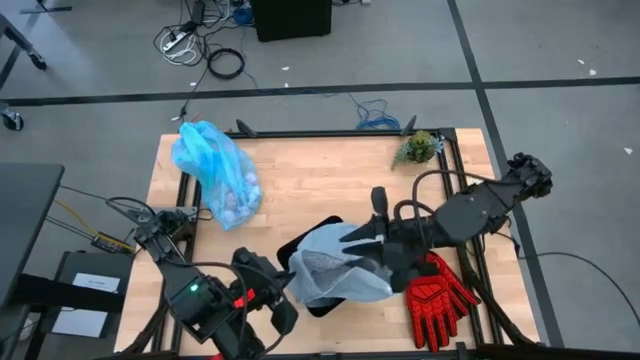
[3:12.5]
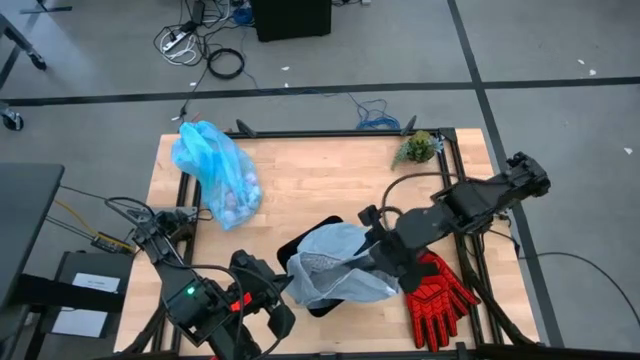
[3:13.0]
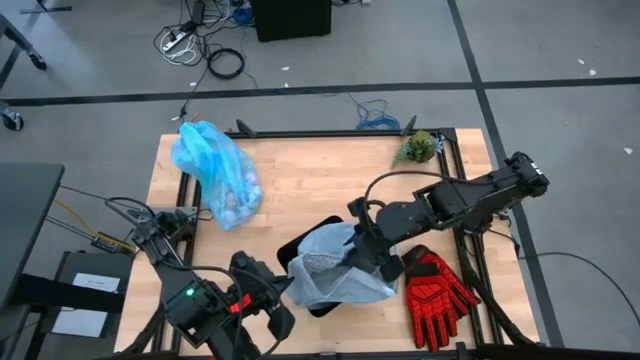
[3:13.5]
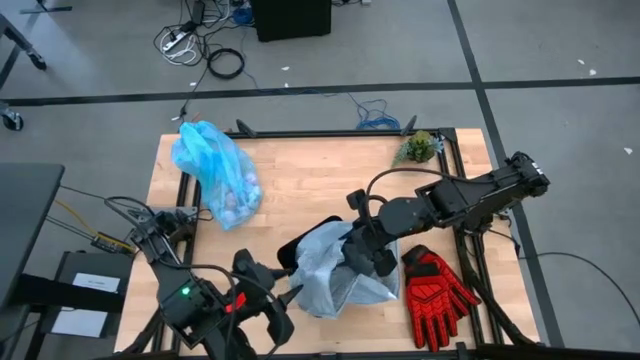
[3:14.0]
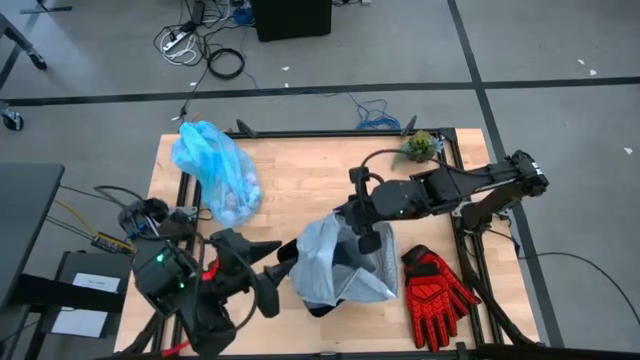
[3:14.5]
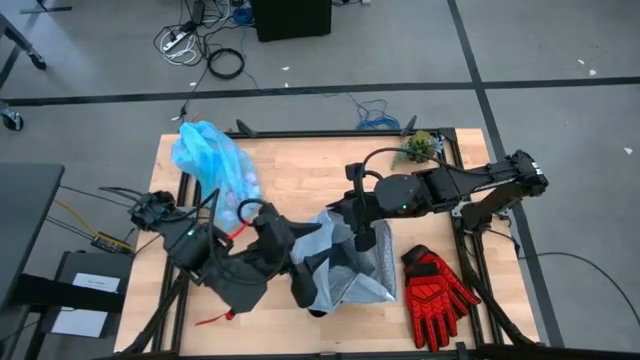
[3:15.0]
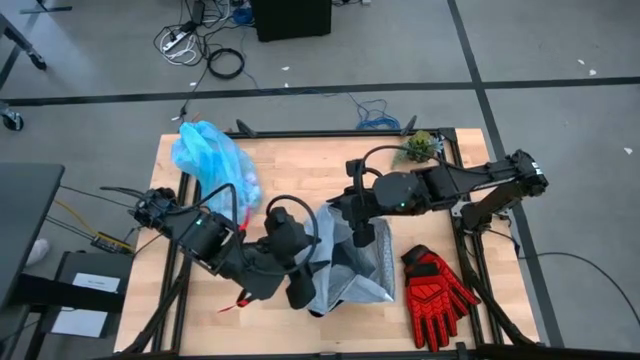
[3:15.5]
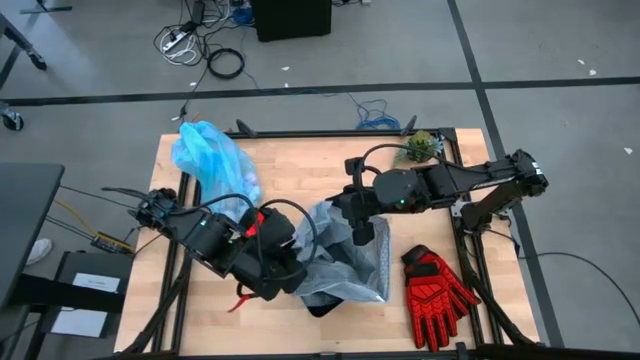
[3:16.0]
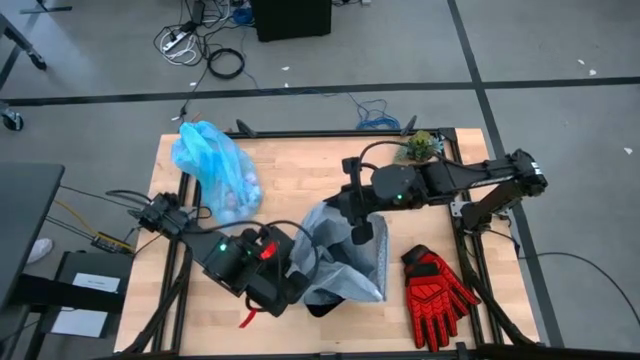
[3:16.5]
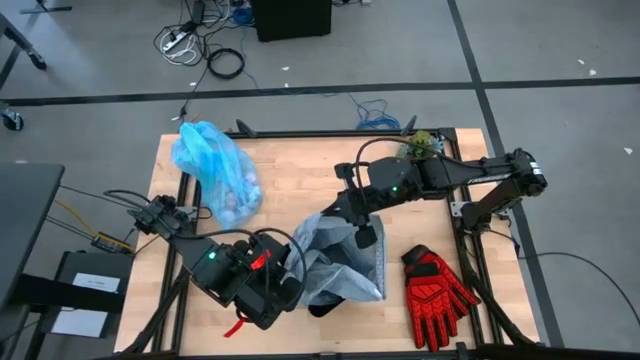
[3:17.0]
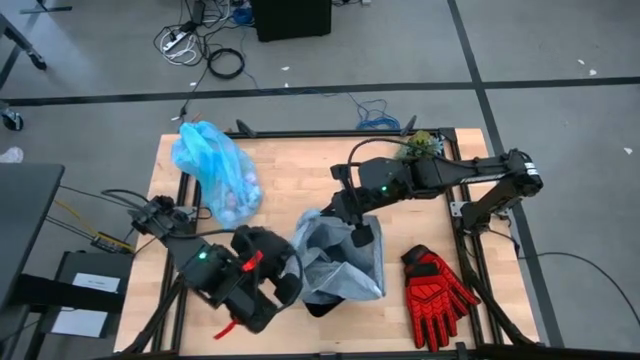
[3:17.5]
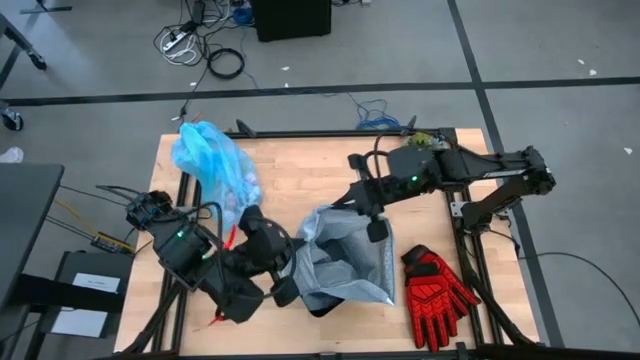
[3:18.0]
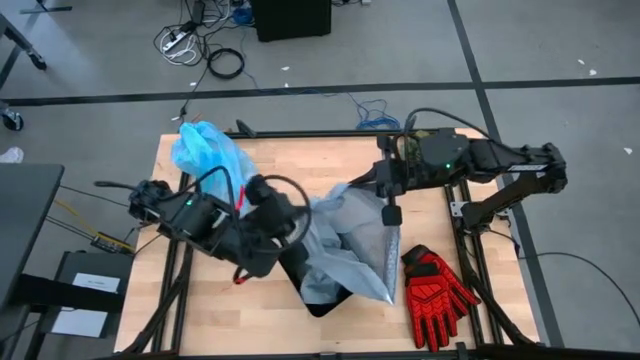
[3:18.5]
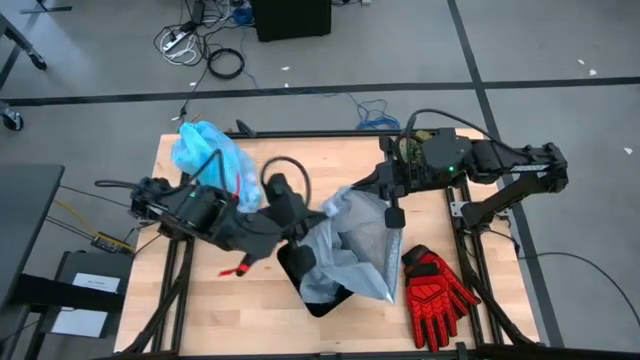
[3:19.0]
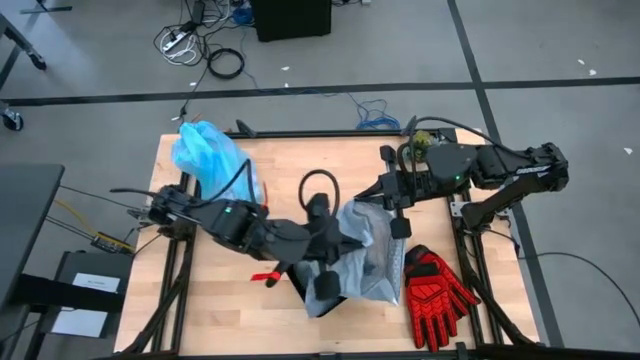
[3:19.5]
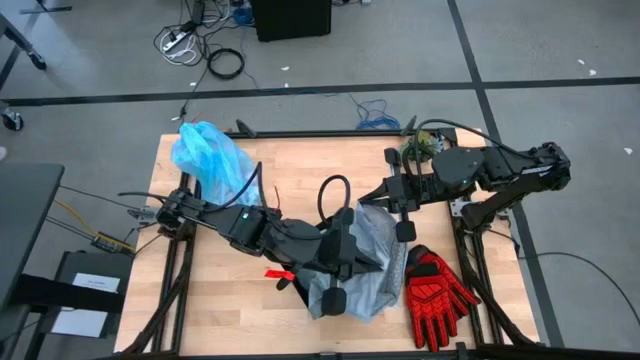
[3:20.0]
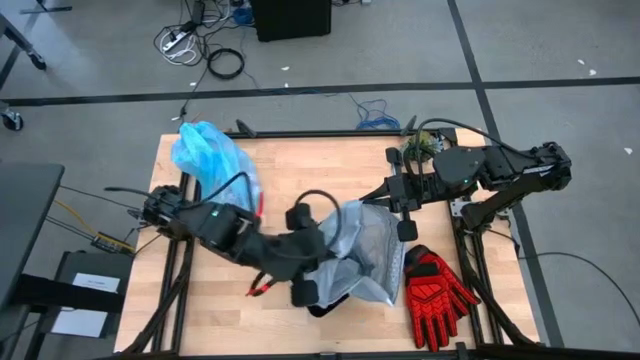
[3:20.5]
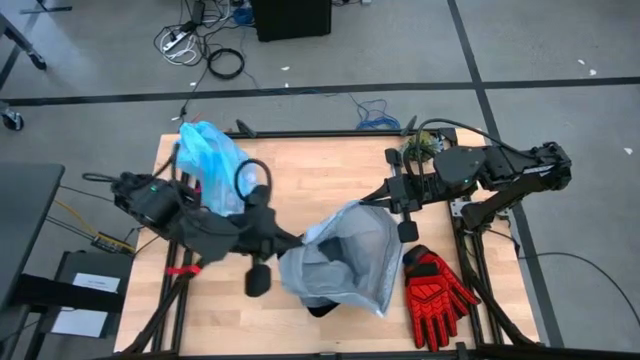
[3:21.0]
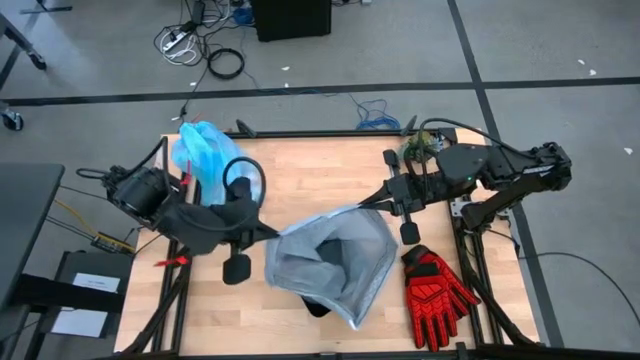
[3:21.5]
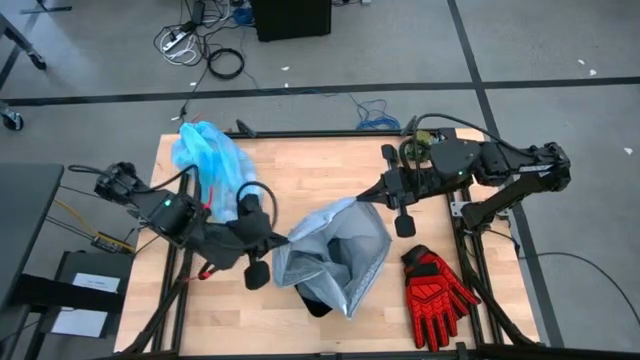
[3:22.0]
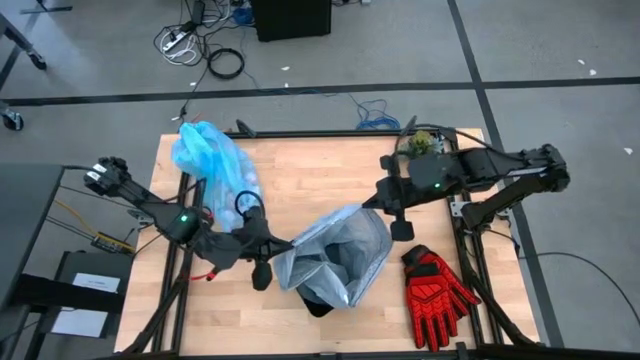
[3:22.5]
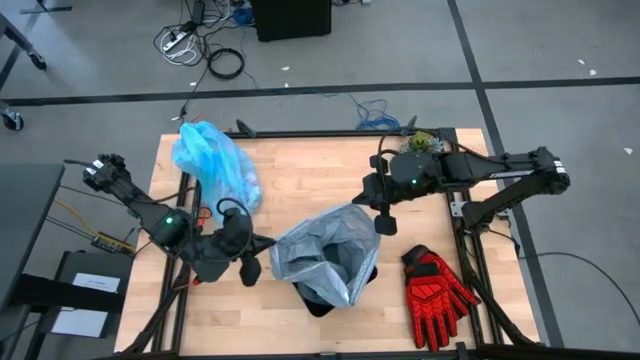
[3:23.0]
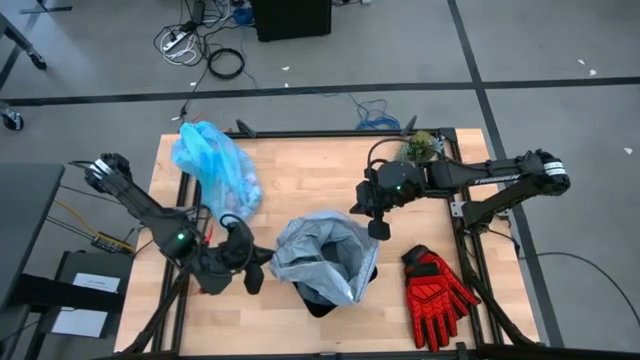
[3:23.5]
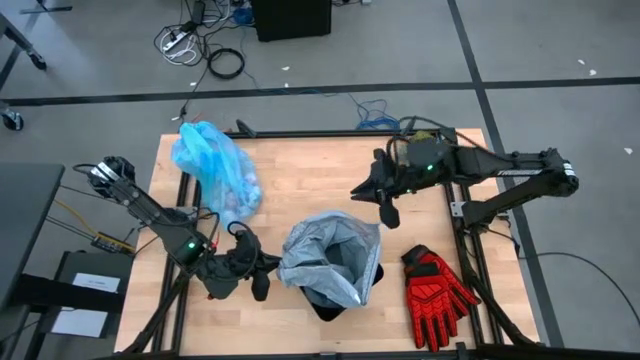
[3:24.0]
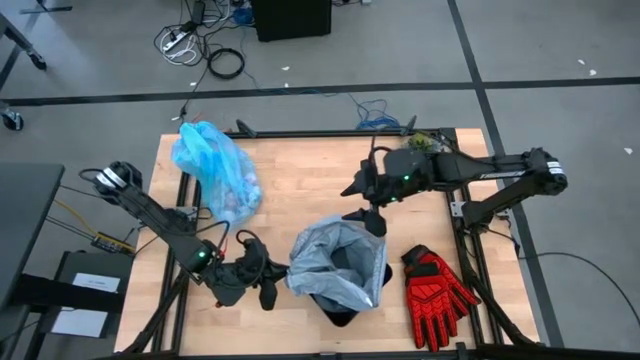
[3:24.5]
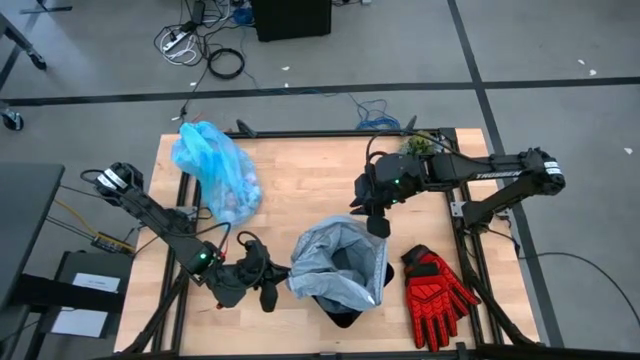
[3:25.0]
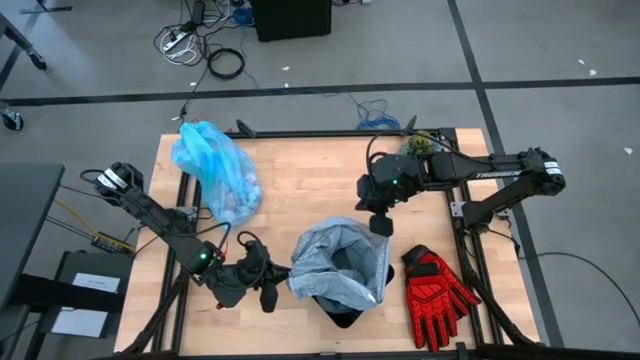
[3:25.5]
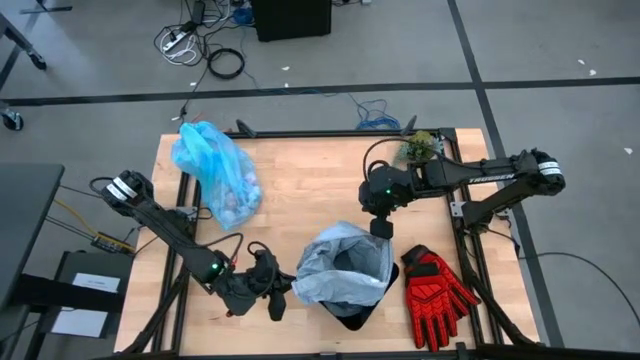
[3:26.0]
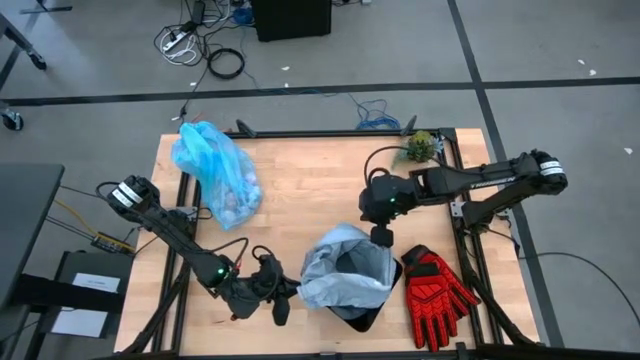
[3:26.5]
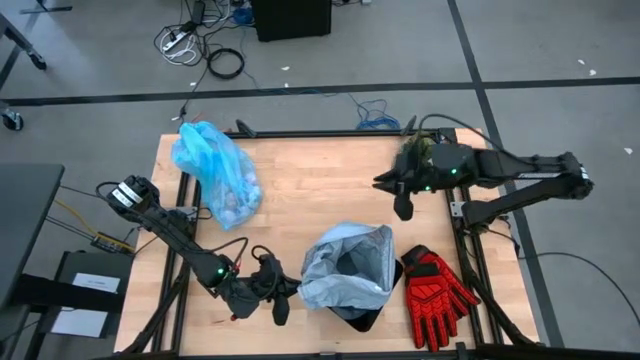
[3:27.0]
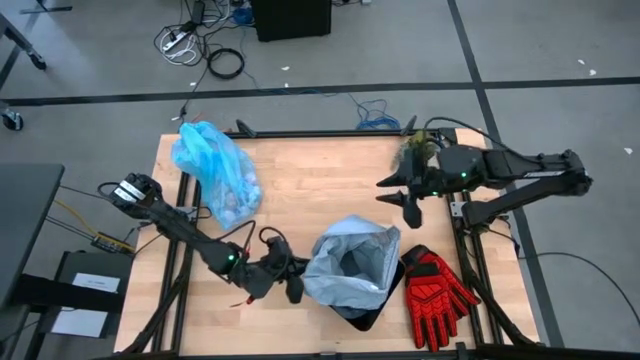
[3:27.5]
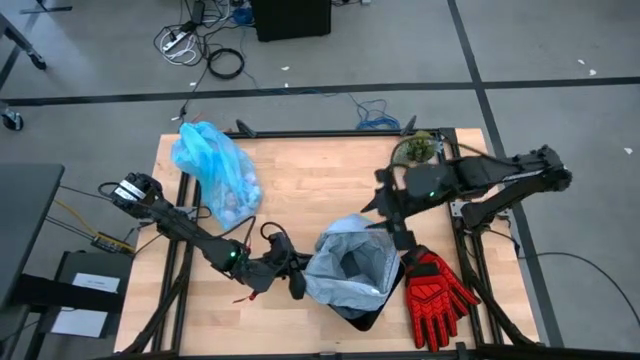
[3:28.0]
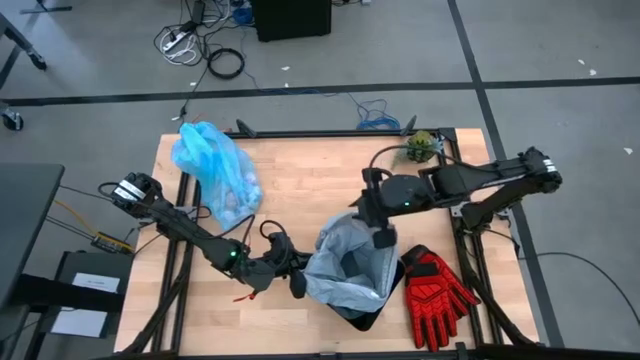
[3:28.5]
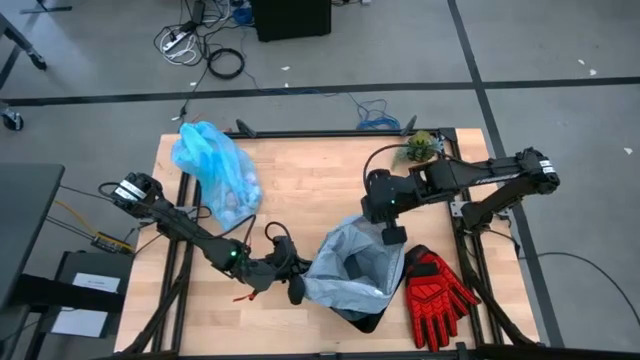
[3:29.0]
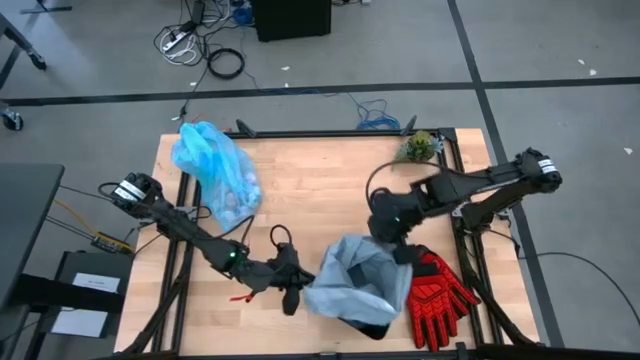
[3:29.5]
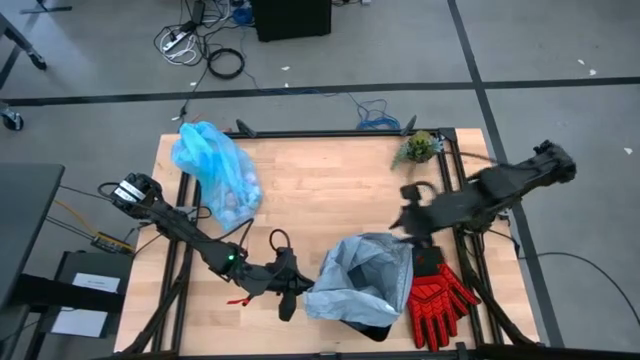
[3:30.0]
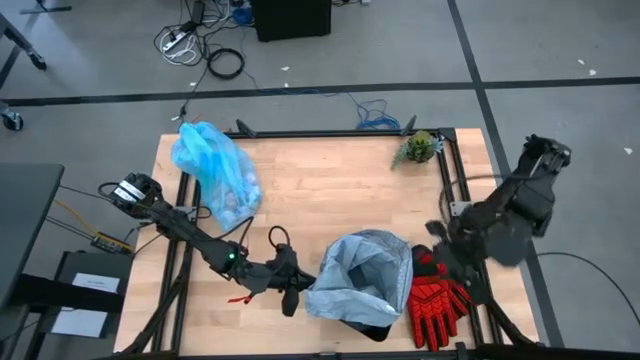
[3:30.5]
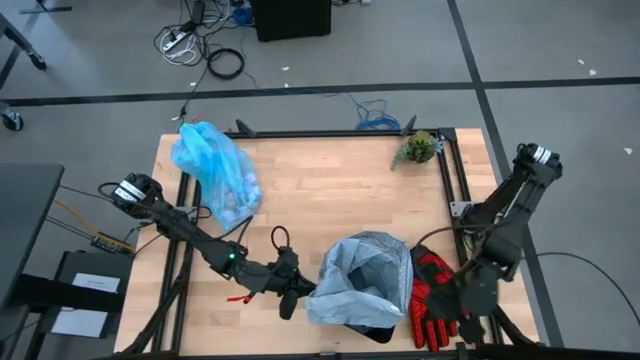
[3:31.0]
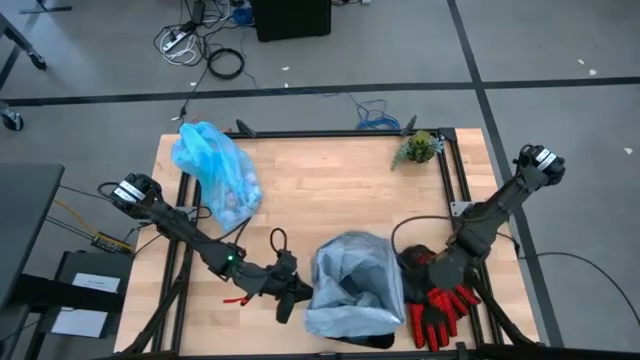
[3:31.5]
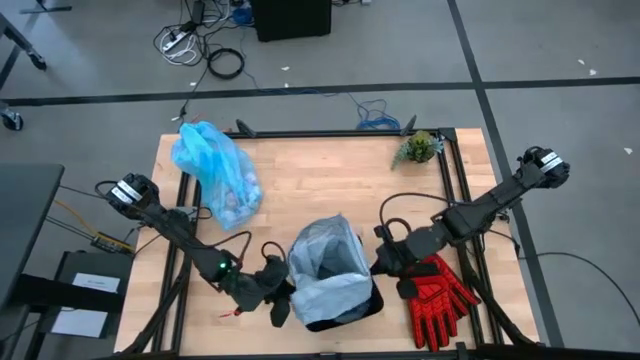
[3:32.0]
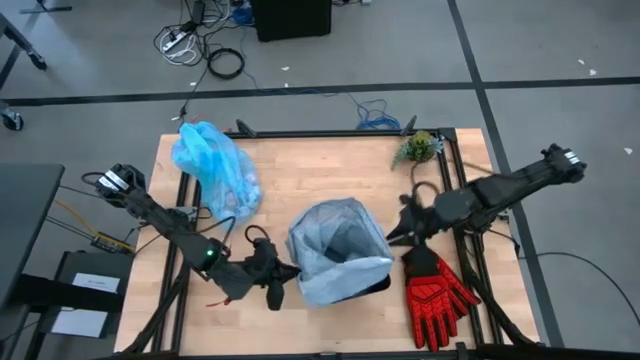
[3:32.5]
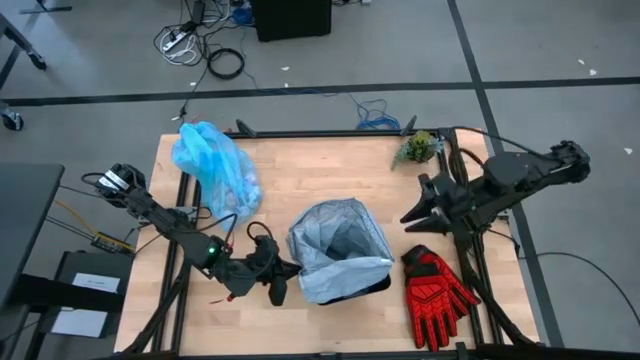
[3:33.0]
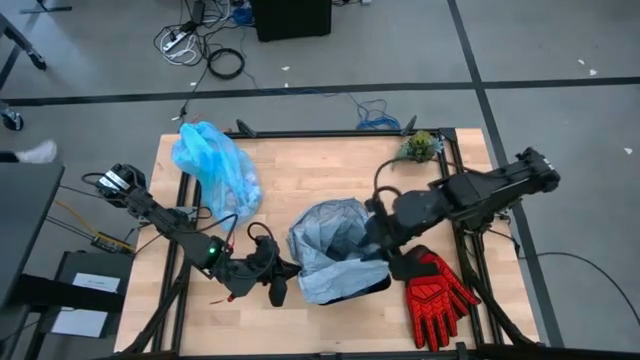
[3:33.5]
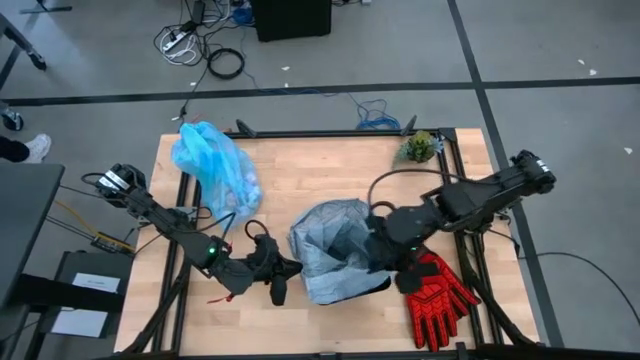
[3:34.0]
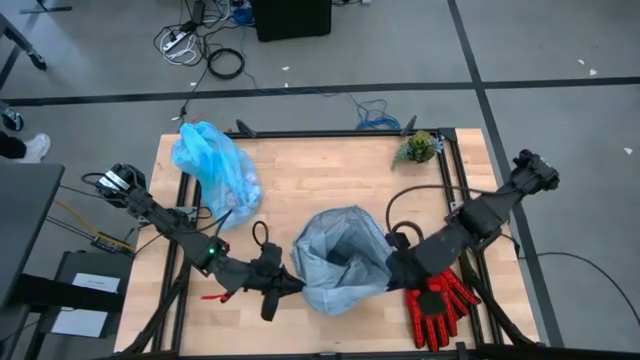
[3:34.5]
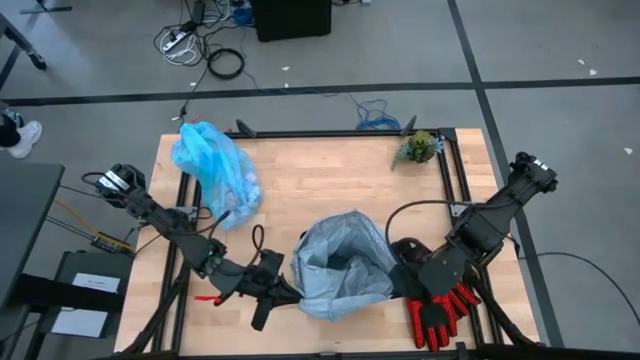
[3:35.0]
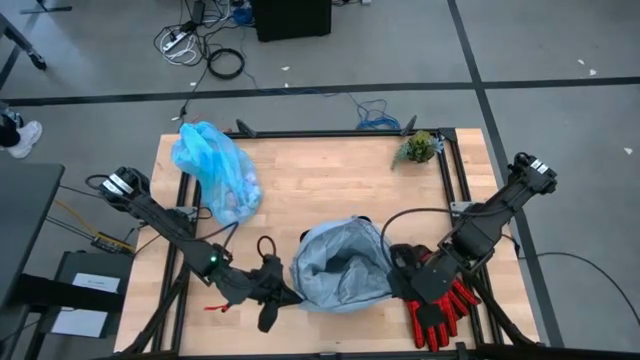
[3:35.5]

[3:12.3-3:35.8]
Task: place trash/remove bag and relplace
Put the gray trash bag into the trash bin
